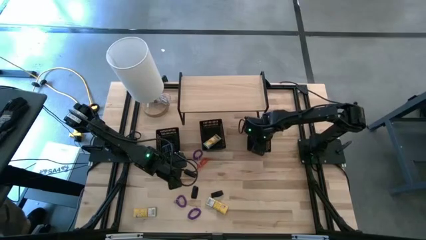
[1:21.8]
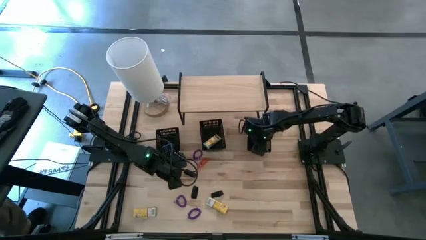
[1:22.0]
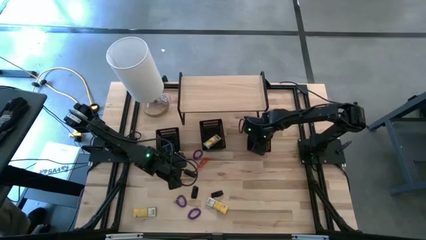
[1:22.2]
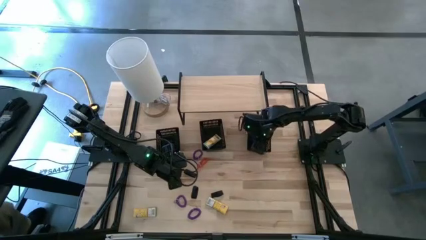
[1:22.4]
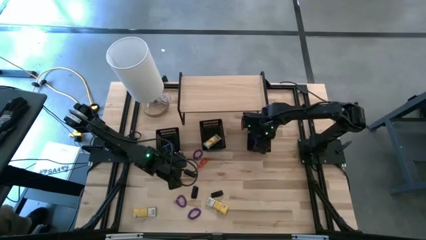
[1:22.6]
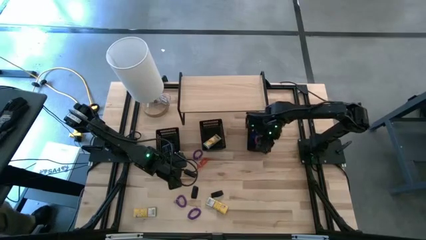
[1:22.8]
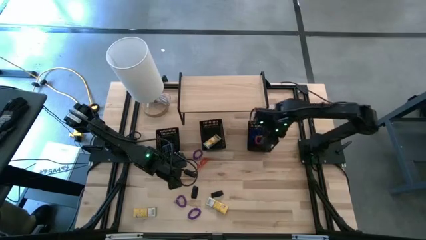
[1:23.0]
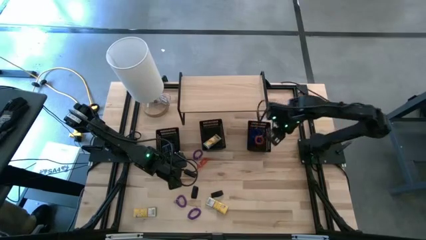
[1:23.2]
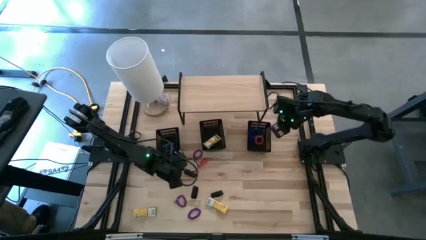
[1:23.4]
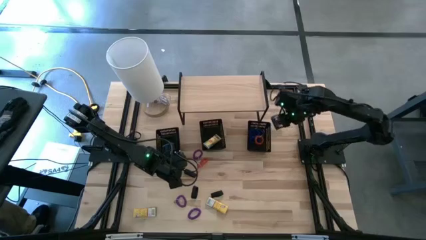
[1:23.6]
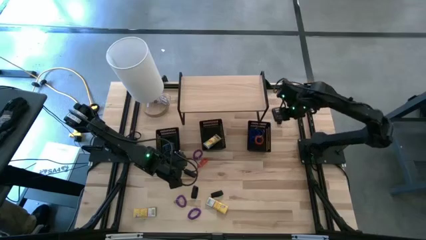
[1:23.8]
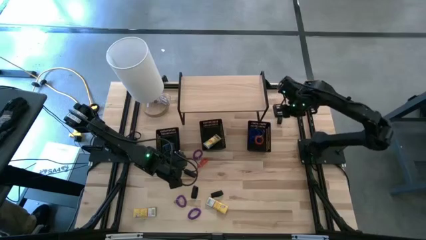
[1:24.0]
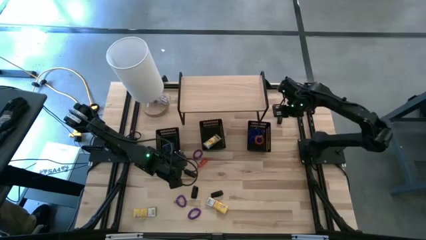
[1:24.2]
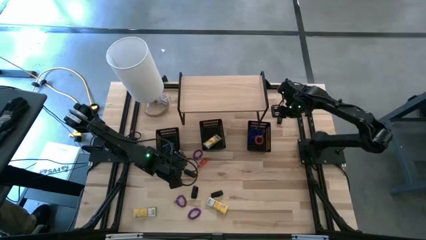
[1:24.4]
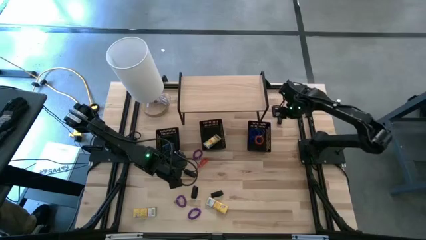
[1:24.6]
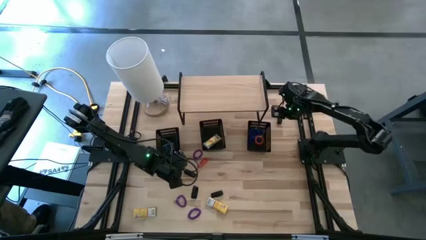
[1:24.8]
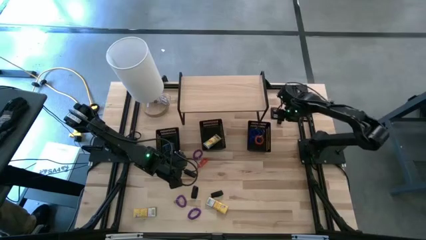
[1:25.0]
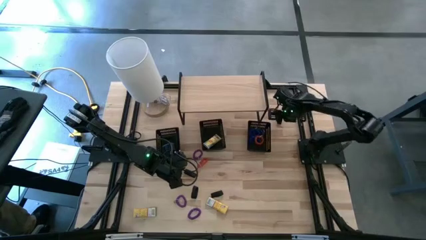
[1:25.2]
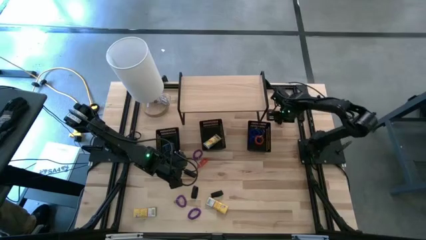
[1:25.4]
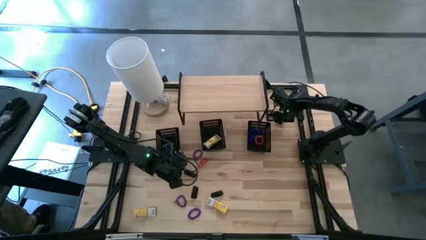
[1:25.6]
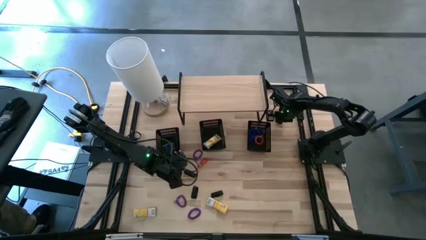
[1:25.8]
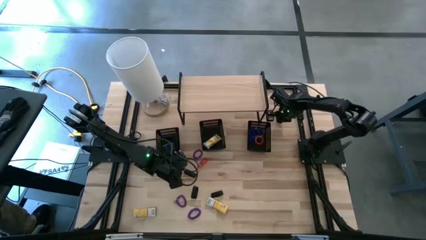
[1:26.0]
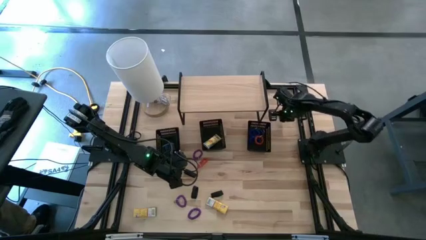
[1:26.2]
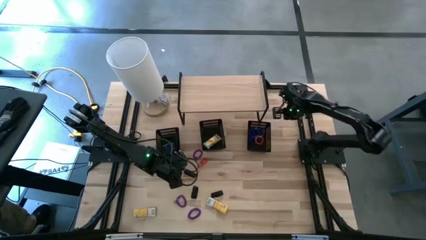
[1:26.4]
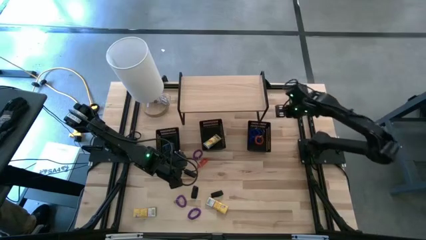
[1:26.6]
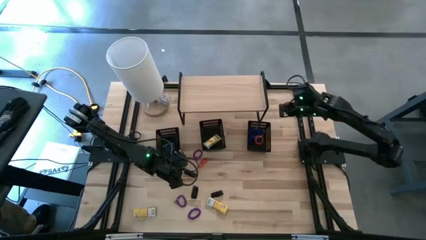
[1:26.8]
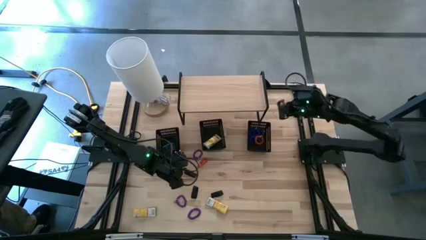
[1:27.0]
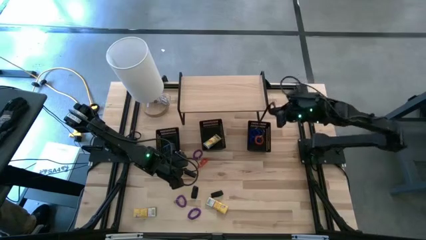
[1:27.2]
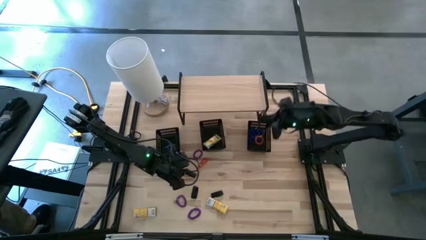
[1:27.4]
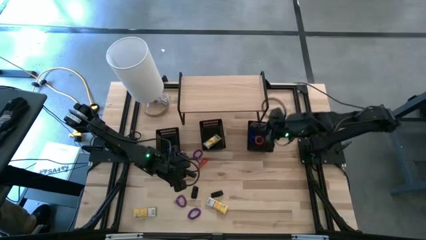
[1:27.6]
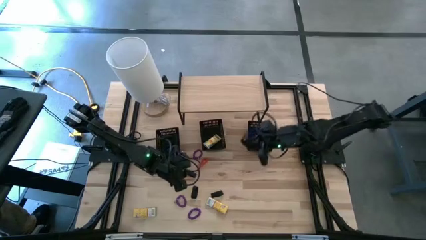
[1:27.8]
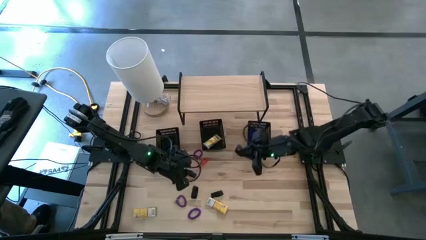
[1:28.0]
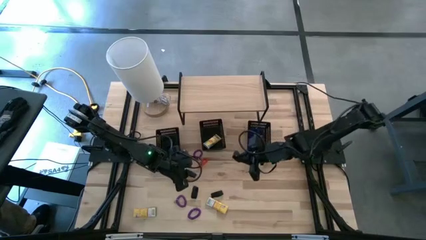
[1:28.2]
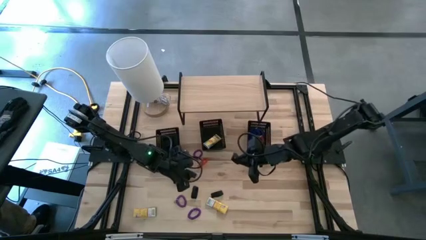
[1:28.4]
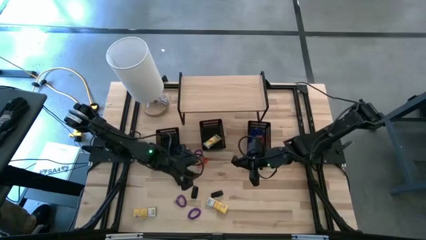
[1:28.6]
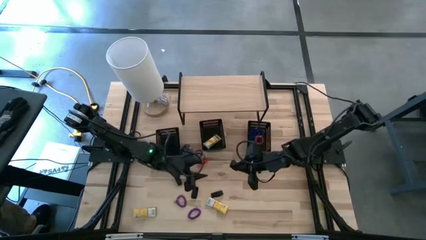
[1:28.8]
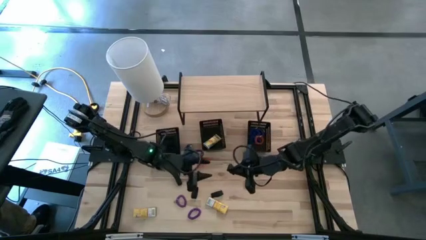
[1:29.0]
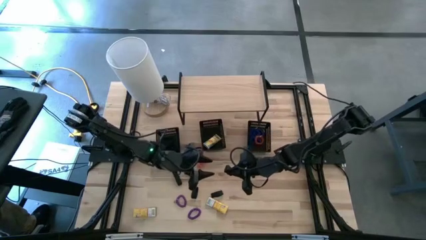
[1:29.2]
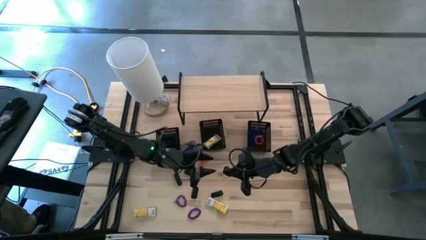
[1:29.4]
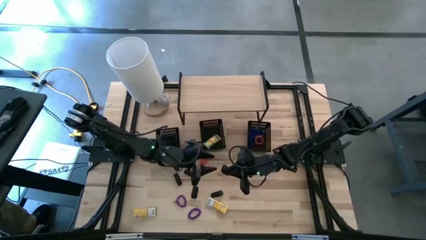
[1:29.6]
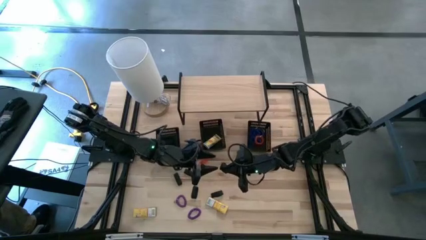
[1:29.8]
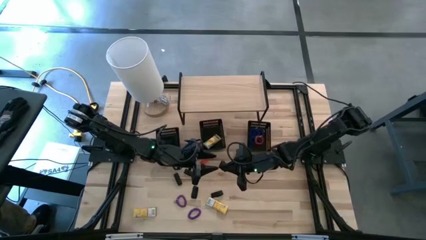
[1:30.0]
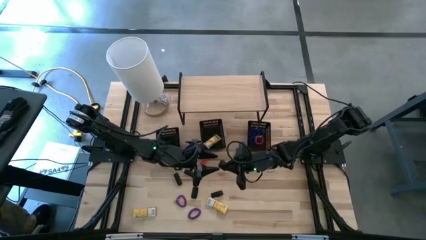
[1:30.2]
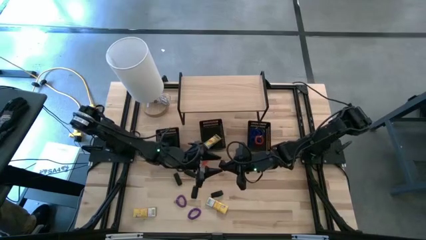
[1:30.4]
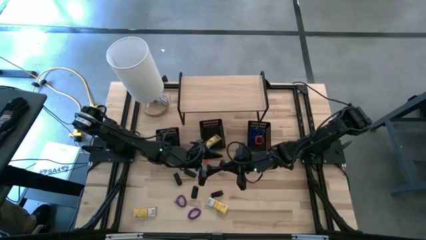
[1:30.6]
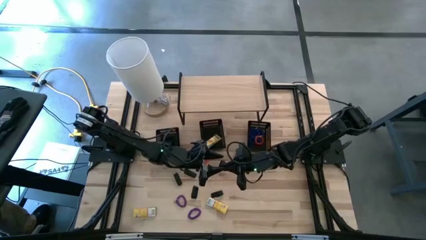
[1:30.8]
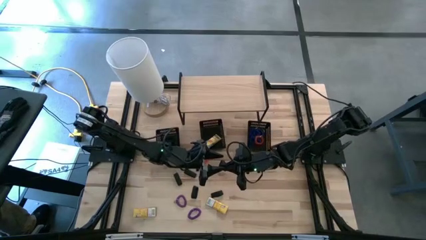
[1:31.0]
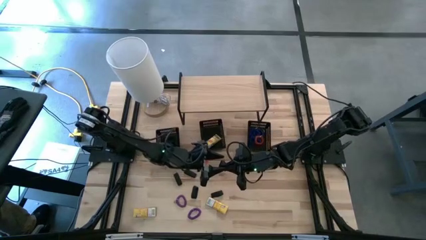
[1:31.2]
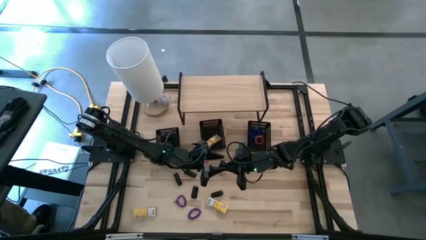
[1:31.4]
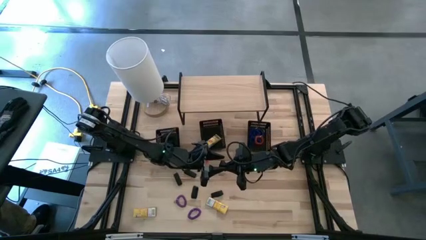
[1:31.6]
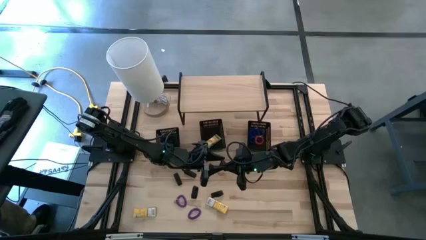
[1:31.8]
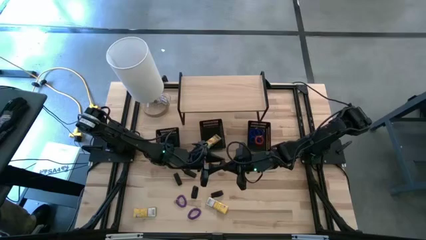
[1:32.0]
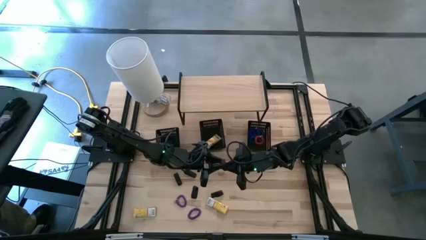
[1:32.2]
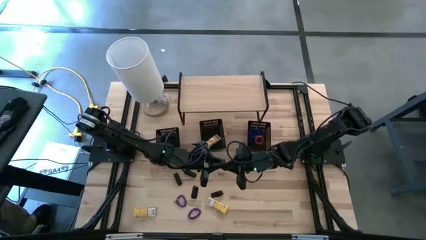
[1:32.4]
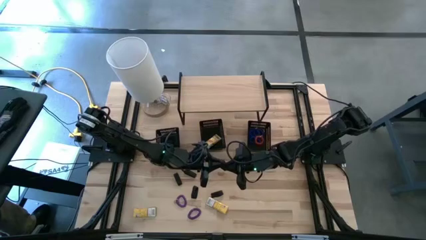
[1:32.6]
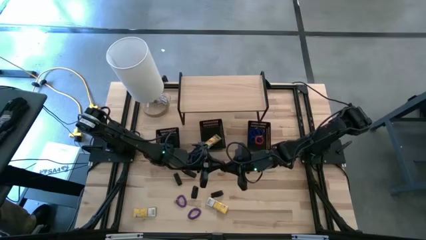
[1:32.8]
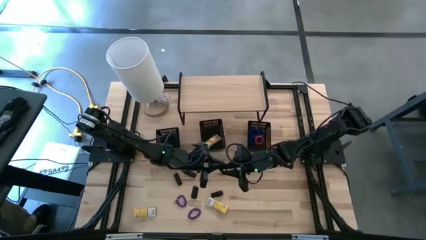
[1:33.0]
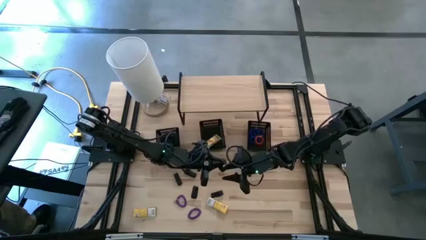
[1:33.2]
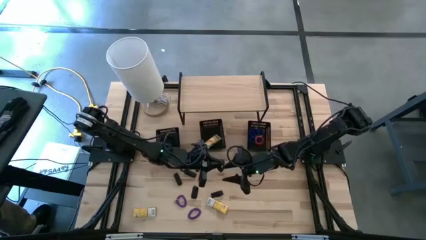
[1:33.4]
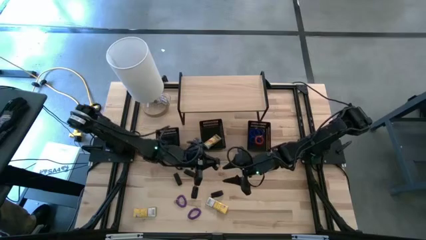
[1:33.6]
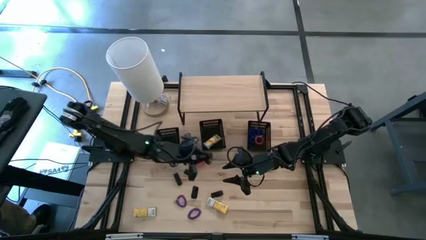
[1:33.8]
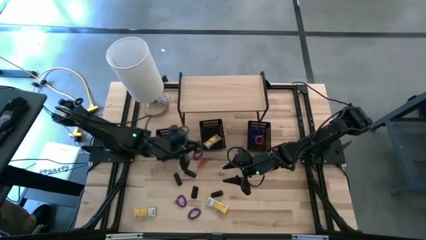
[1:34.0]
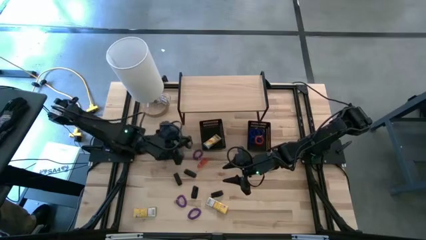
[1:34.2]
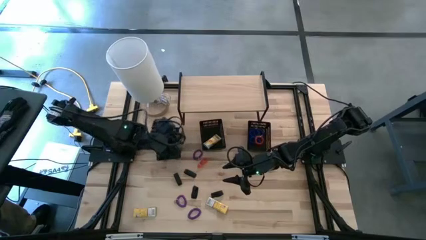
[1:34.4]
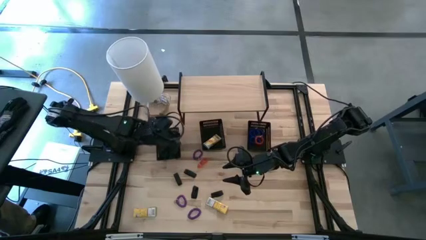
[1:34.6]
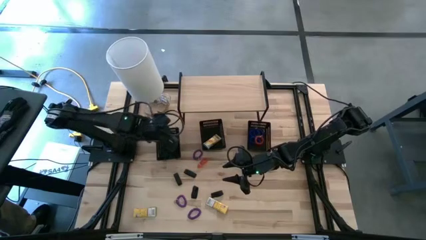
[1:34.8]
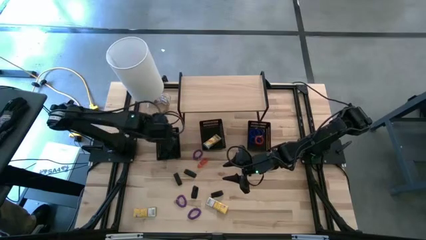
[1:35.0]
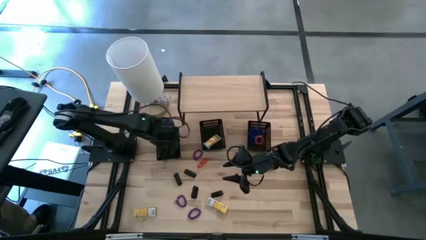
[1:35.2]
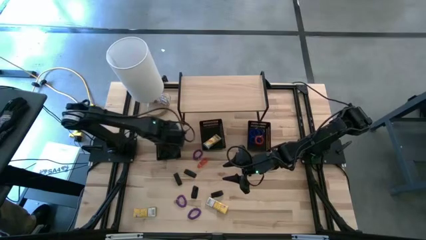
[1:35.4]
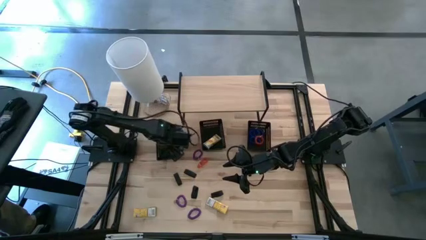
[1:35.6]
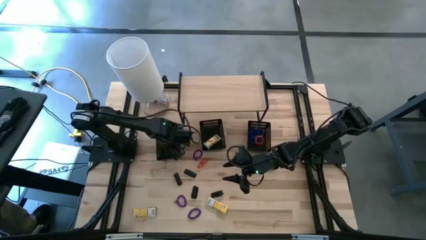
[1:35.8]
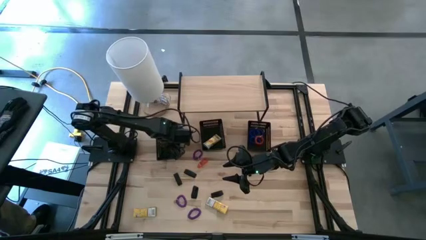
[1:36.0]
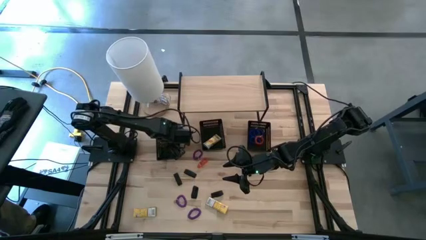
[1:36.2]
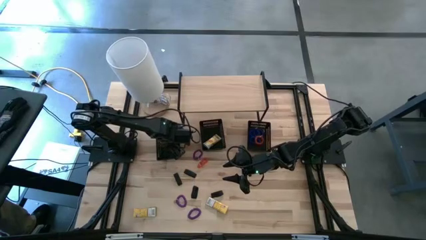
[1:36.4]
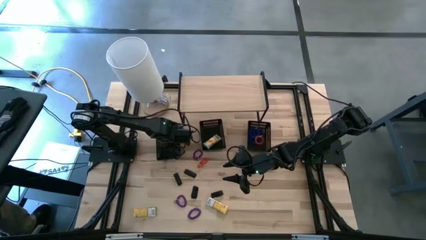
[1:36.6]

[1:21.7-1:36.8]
Task: Pick & Place Office Desk Supplies
Put the black rubber band into the left black bin

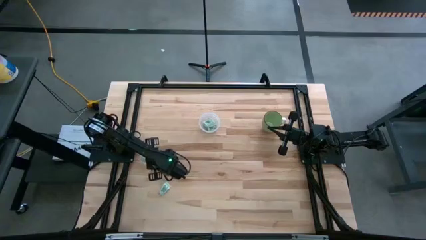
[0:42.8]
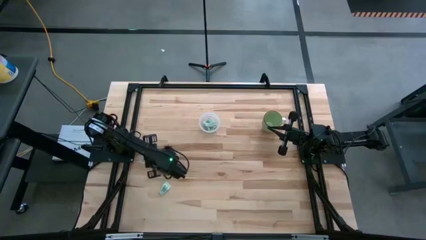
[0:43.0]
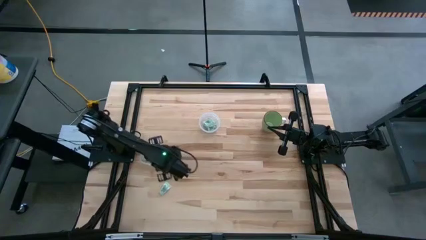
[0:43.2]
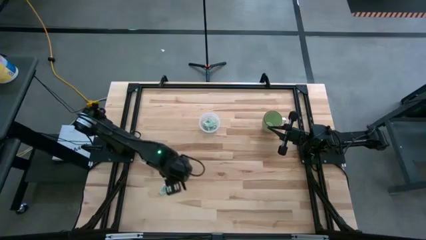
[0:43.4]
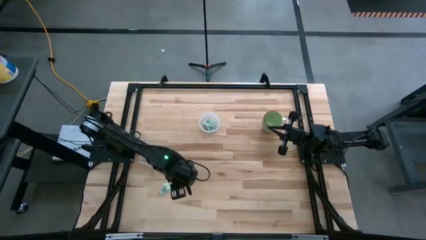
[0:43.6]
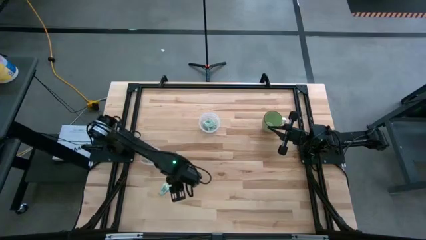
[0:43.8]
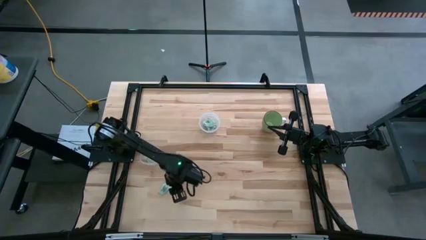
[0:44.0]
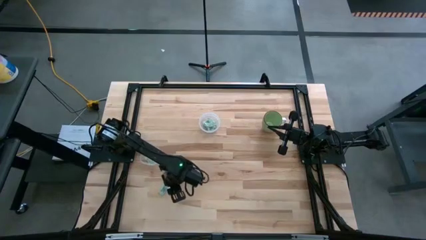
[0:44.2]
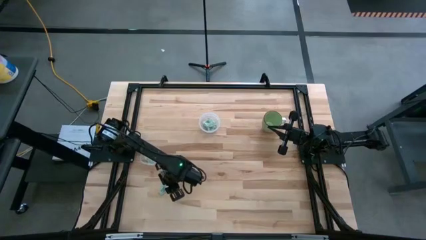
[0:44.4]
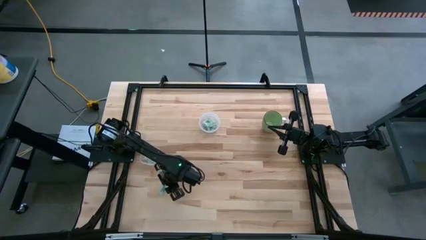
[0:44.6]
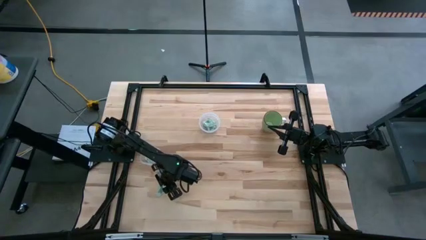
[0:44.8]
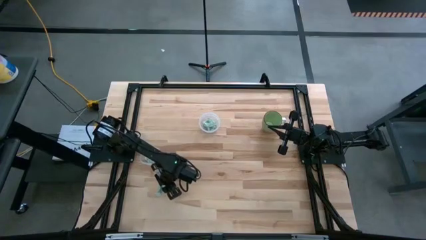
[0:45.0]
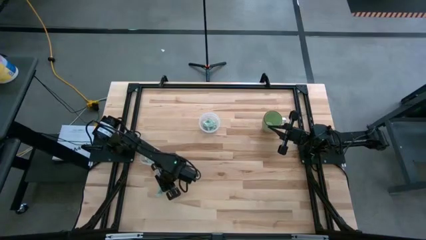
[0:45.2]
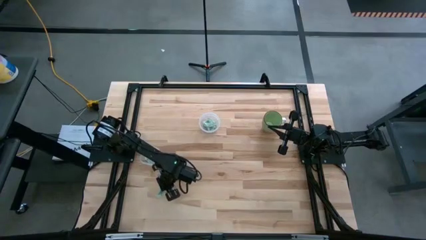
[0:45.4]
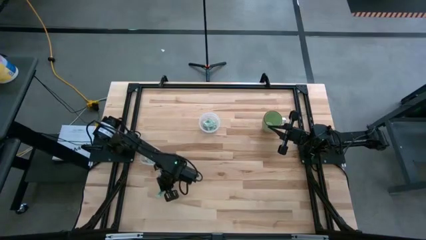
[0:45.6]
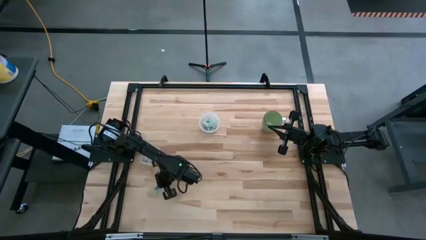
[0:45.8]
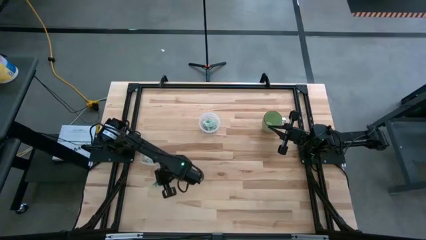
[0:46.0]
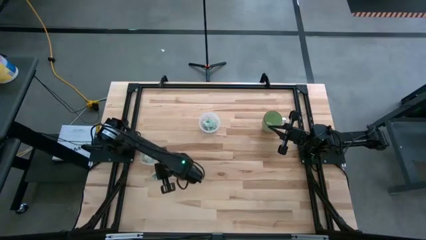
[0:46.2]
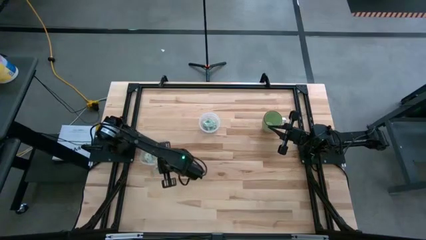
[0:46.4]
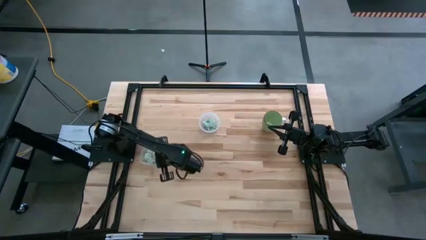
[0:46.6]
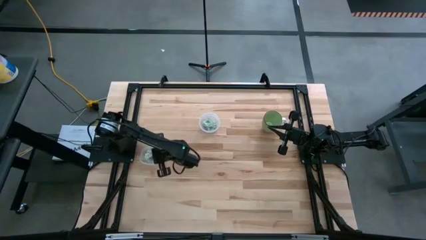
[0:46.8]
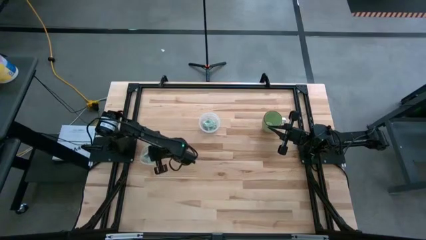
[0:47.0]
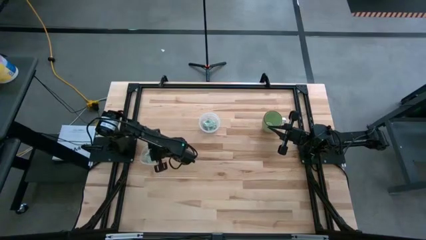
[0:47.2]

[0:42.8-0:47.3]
Task: Pick and place Stevia / Truvia into bins
Put the stevia packet into the left transparent container
